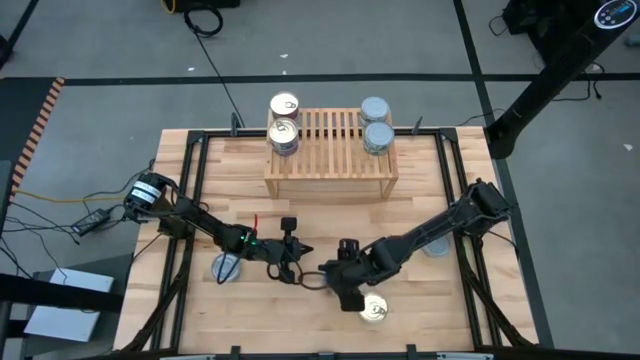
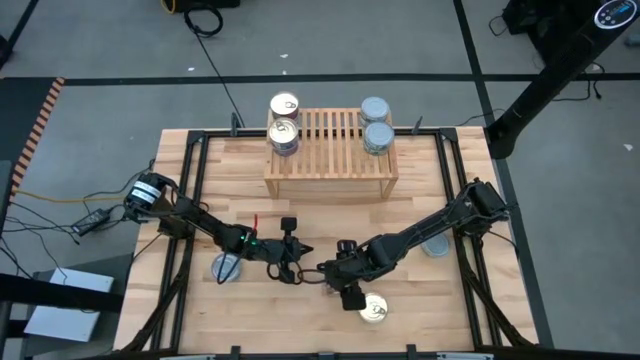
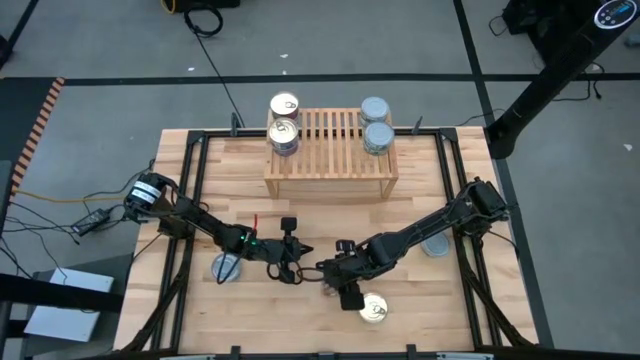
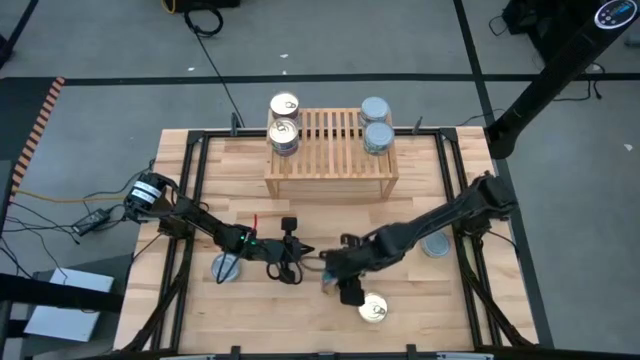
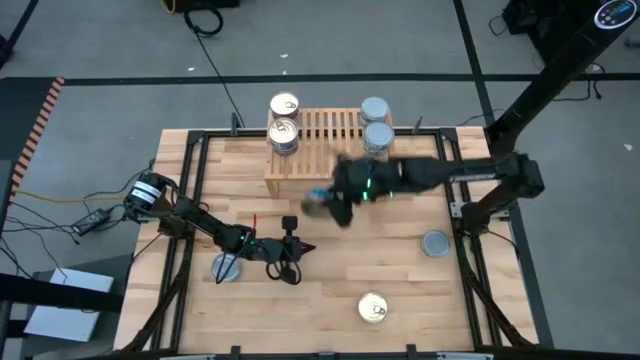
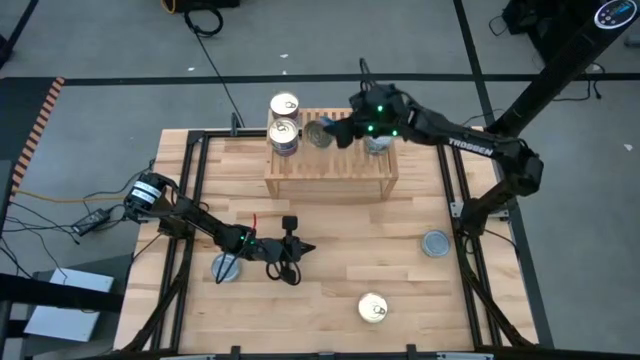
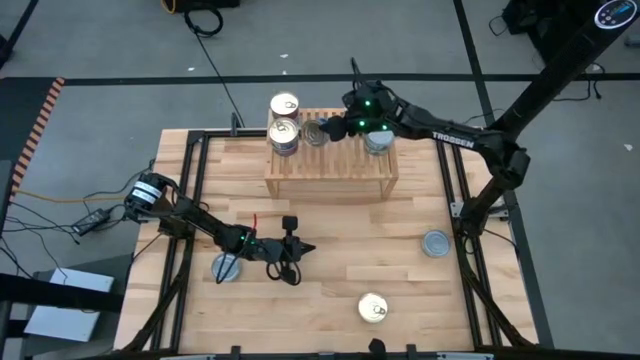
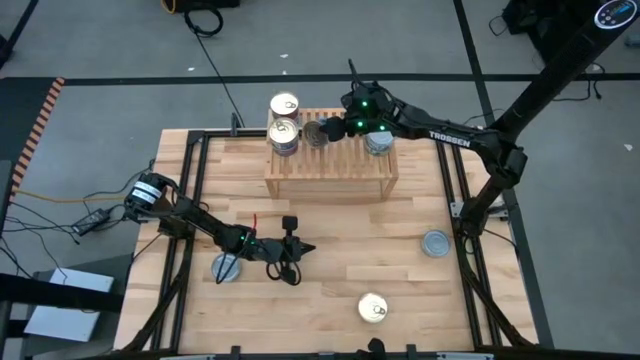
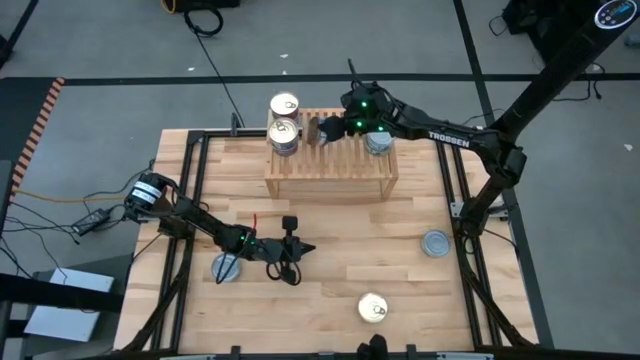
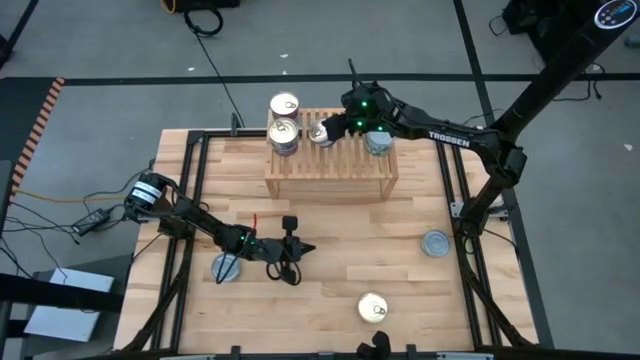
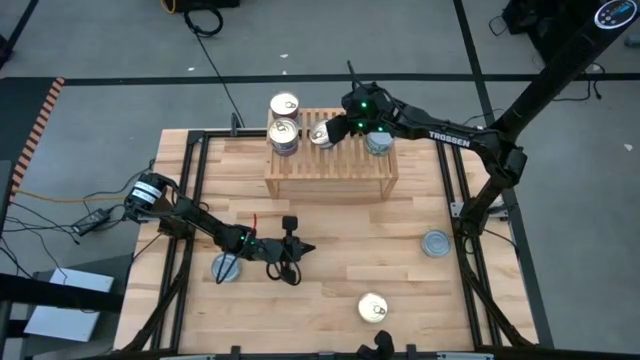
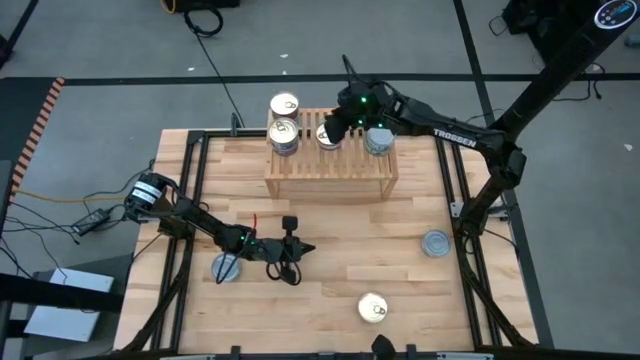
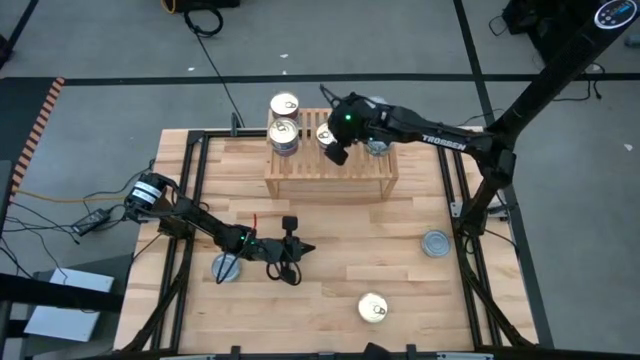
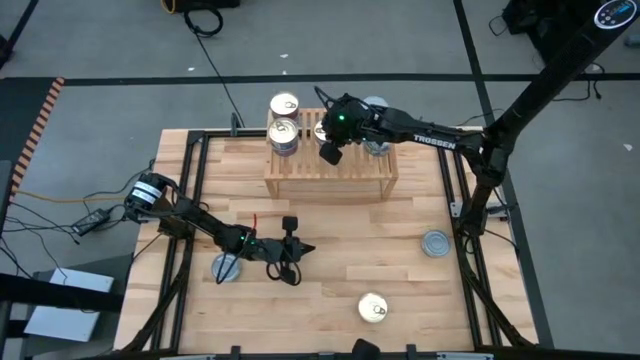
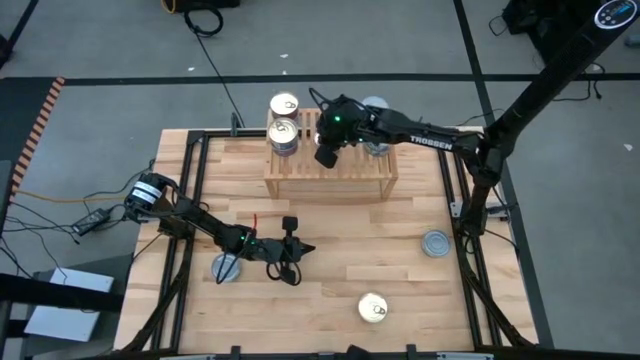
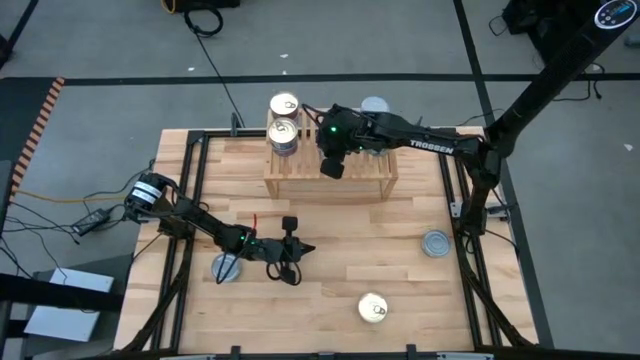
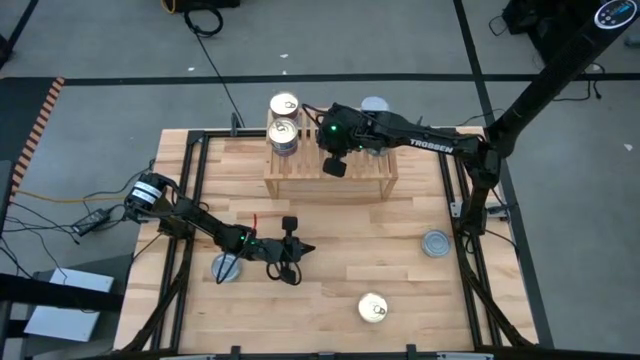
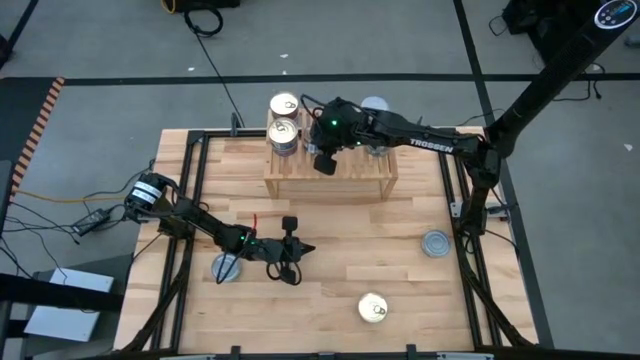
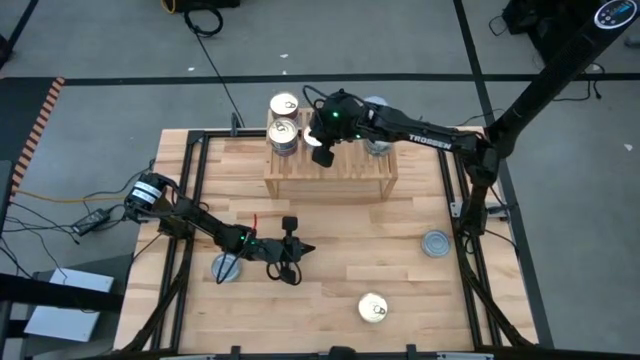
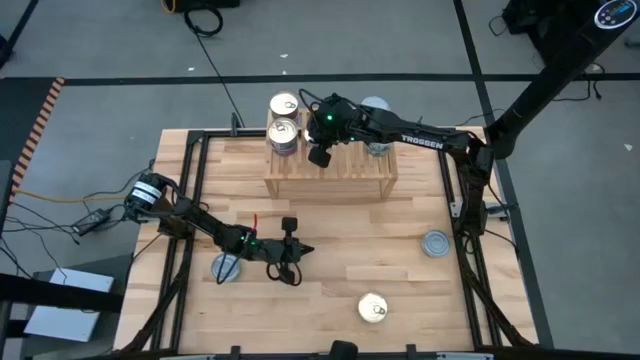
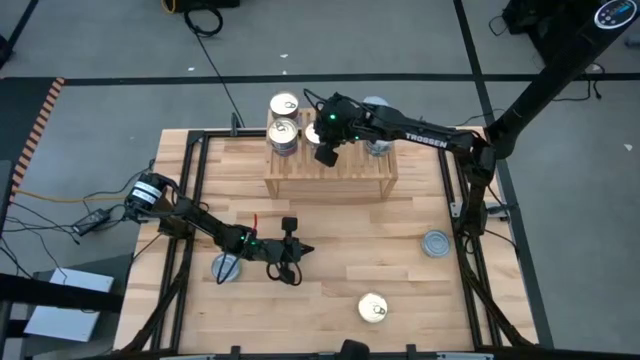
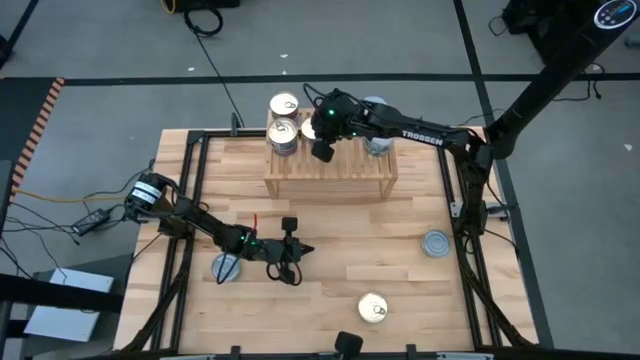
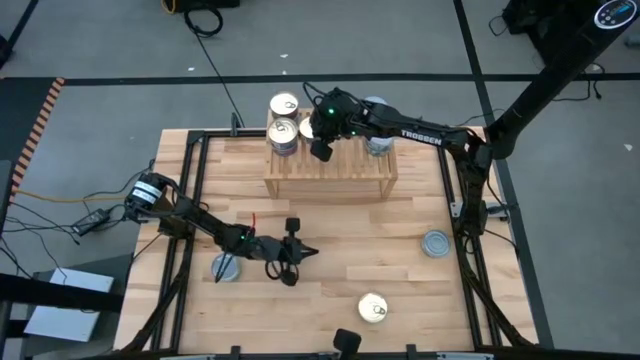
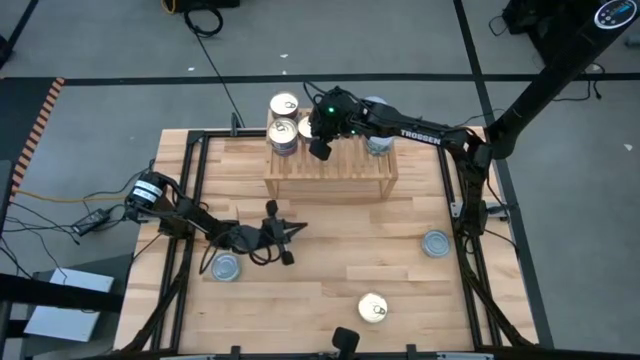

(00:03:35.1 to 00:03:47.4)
Task: Stack canned seafood by type on shelf
Put the blue pink tuna can on the shelf
